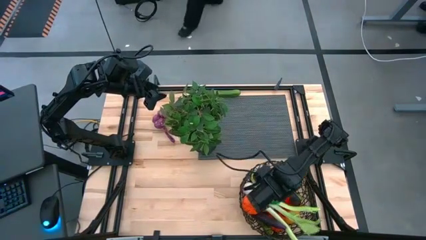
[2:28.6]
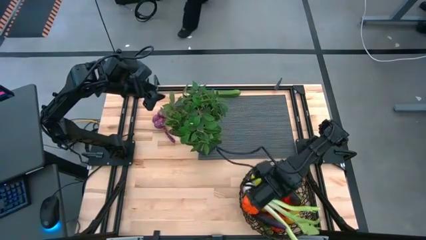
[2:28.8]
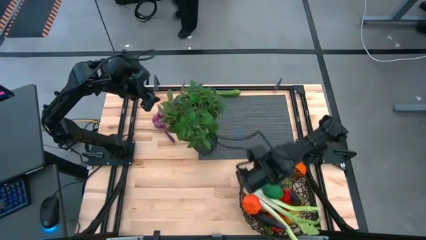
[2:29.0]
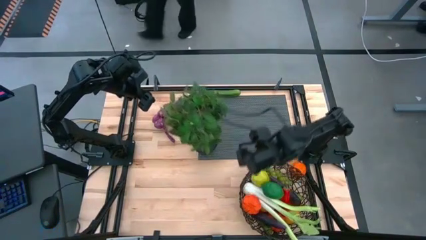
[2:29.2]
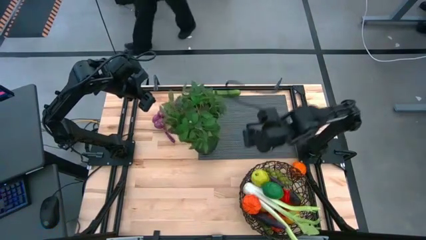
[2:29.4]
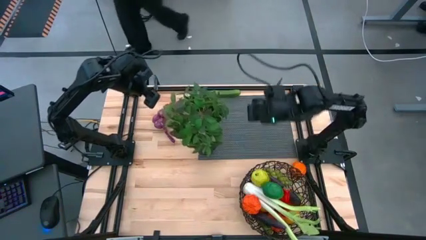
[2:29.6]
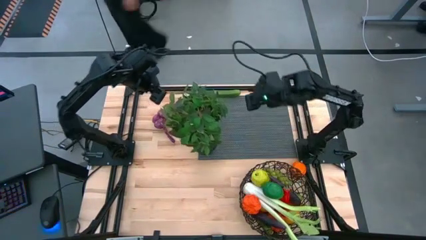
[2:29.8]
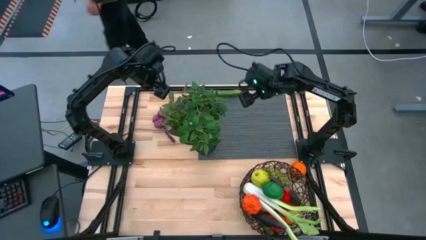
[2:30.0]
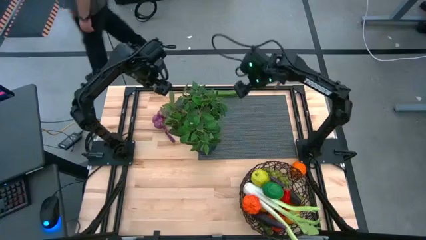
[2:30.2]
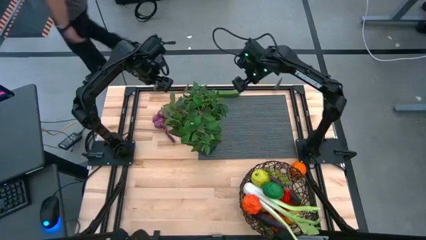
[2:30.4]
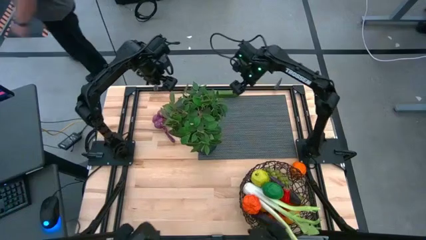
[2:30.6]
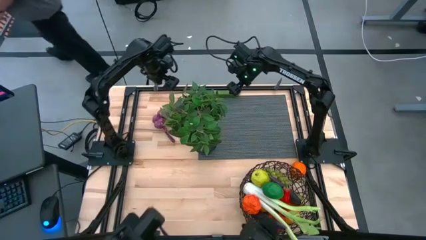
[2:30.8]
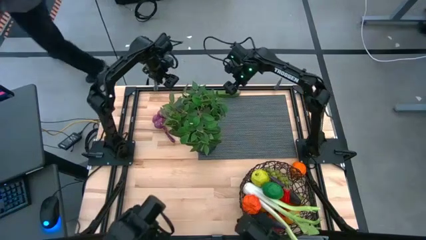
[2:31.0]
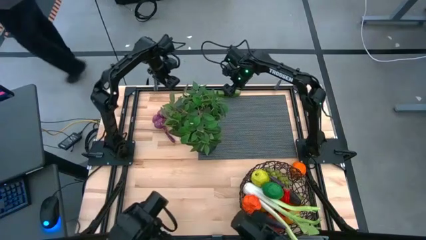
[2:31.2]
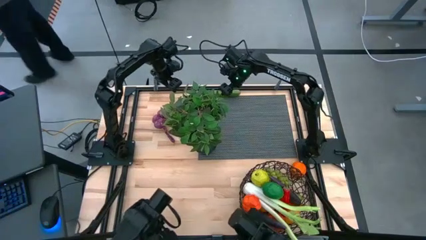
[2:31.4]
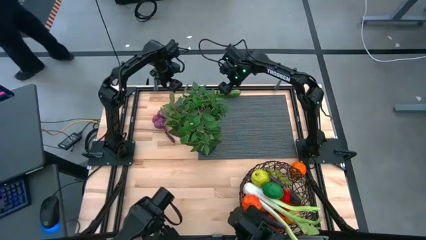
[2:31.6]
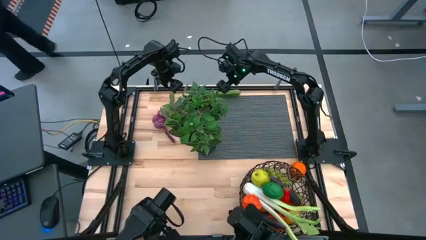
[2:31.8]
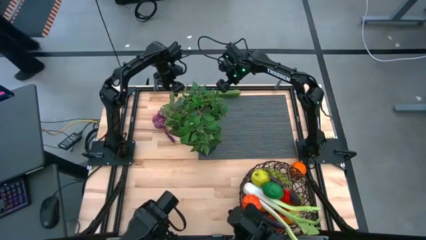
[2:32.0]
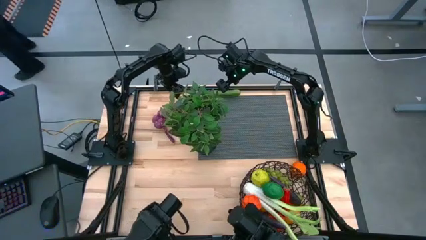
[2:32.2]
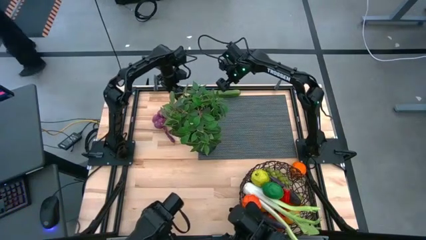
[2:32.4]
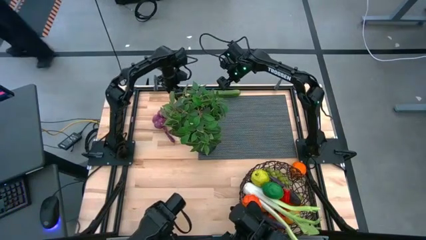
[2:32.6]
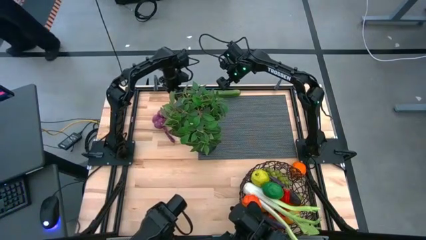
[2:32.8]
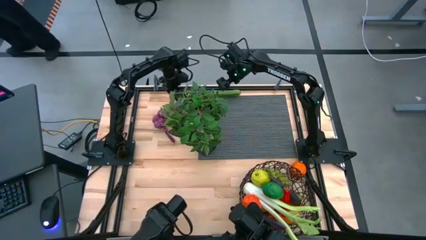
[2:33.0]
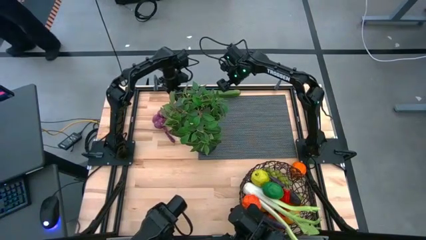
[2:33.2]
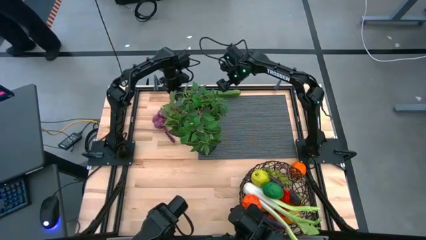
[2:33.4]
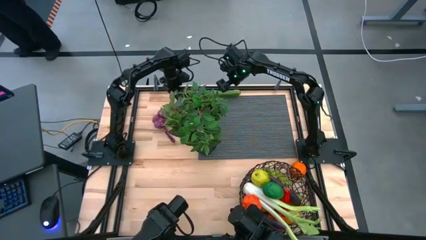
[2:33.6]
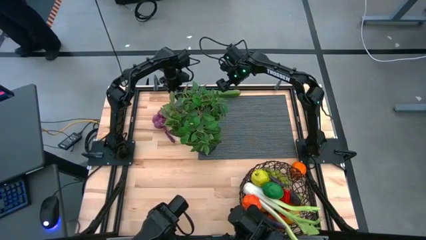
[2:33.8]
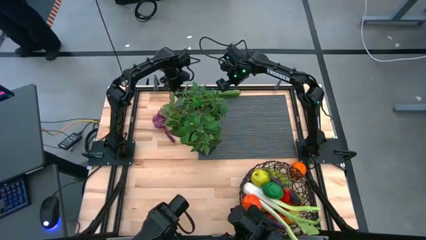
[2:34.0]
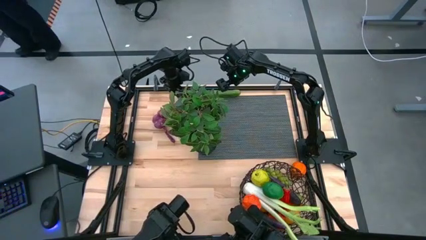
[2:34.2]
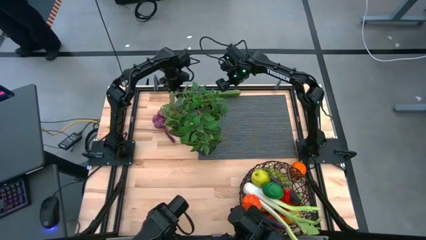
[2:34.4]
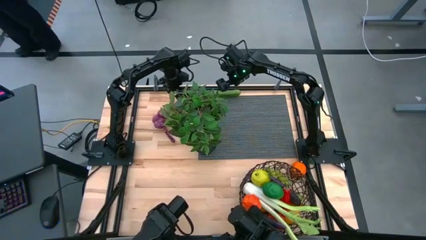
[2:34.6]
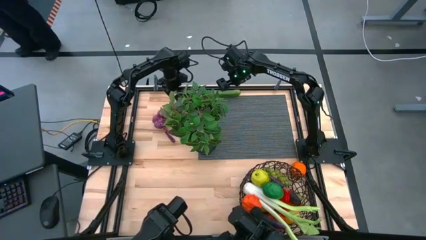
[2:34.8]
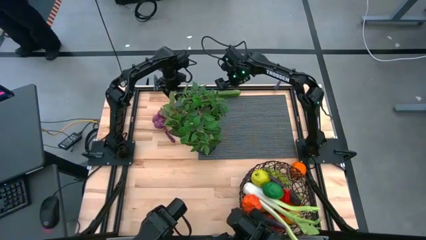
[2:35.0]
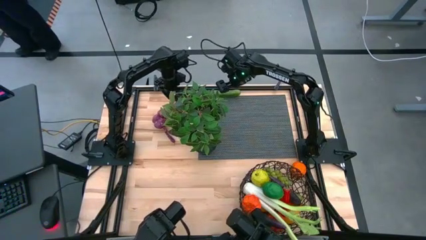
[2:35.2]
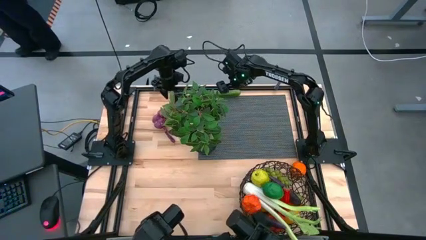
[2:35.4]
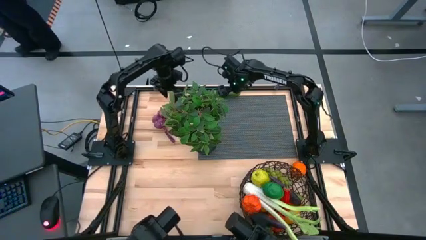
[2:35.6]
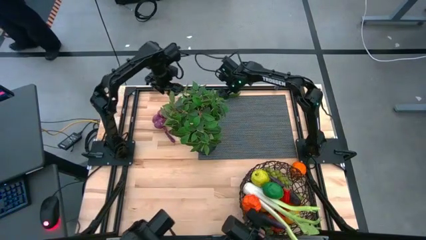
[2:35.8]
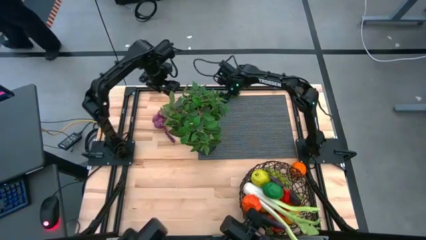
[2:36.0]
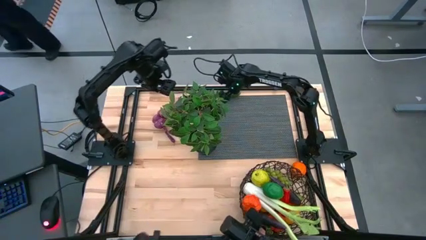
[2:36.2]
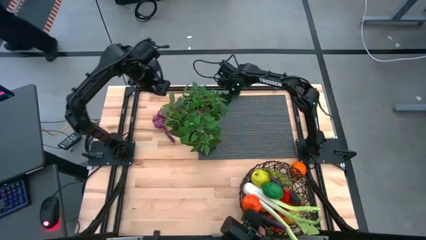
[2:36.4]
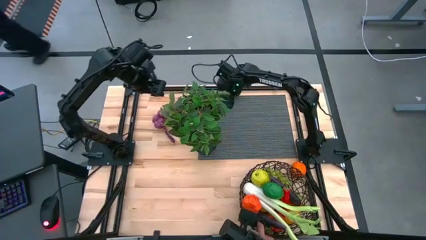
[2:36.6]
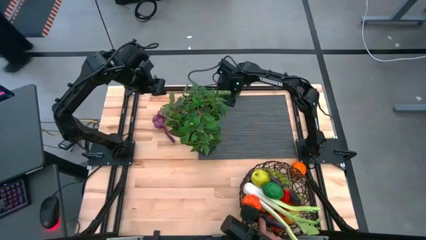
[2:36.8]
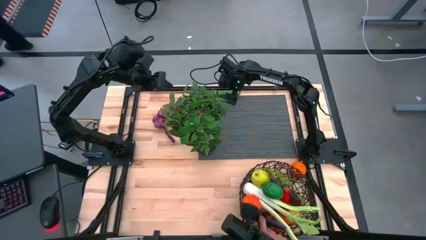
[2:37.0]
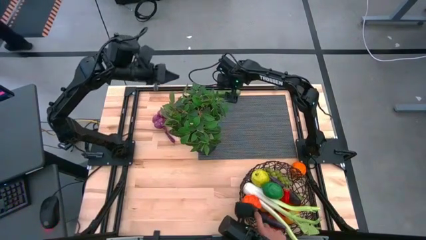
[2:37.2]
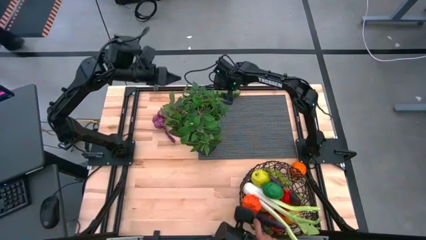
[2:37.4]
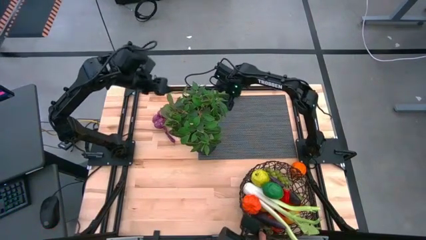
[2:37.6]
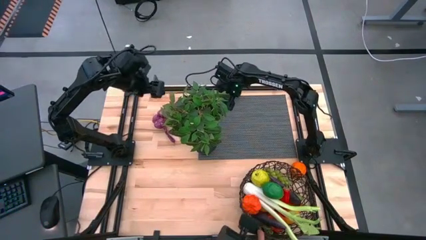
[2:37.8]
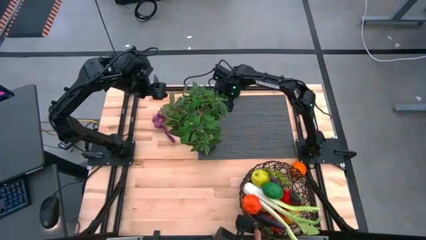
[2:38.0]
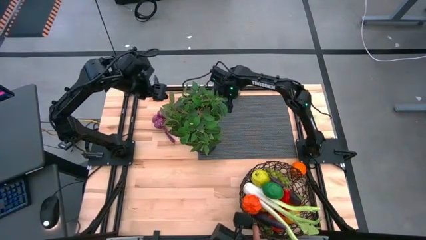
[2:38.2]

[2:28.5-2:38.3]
Task: Build produce basket
Put the green cucumber into the brown wire basket

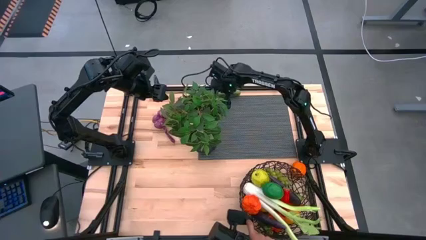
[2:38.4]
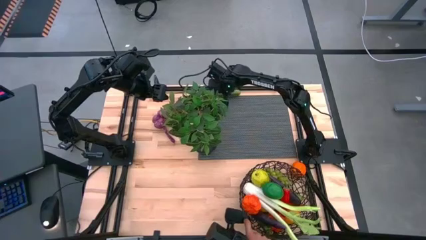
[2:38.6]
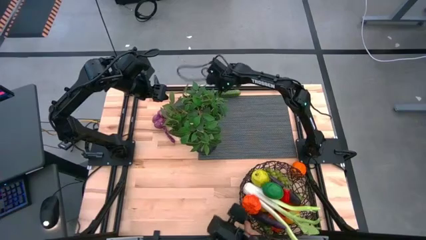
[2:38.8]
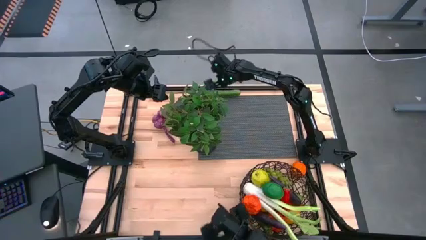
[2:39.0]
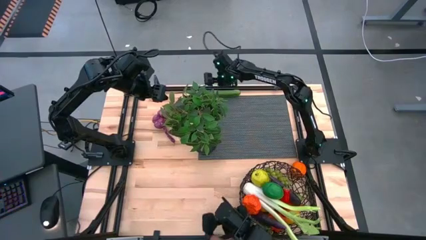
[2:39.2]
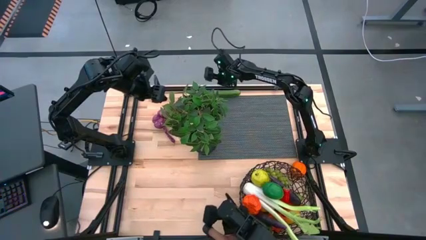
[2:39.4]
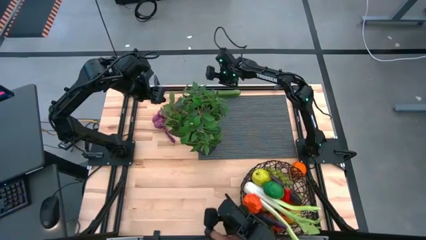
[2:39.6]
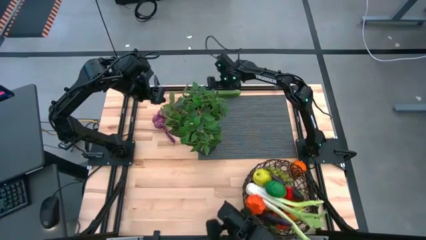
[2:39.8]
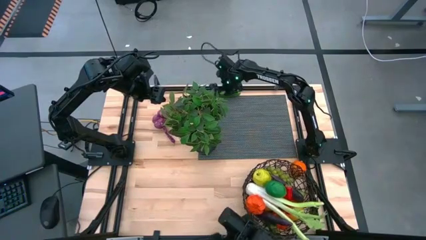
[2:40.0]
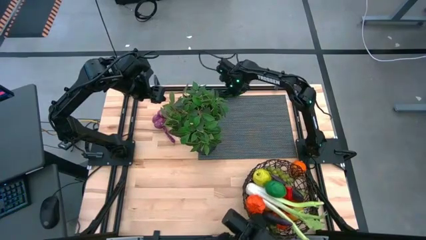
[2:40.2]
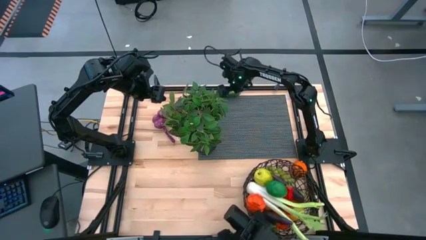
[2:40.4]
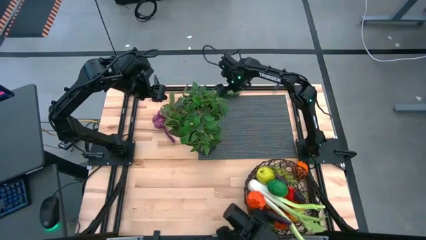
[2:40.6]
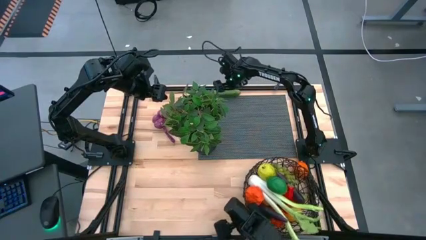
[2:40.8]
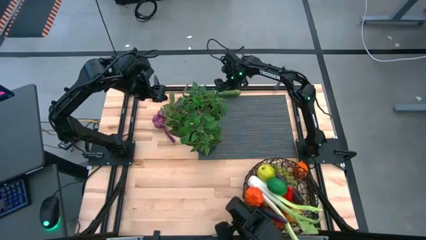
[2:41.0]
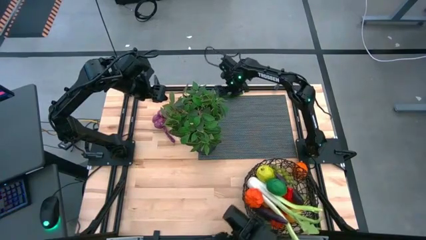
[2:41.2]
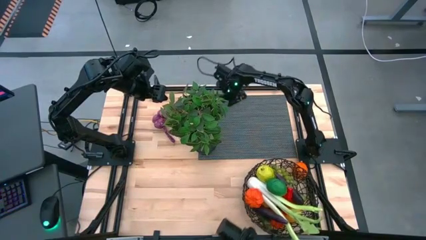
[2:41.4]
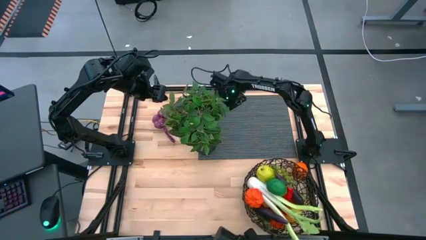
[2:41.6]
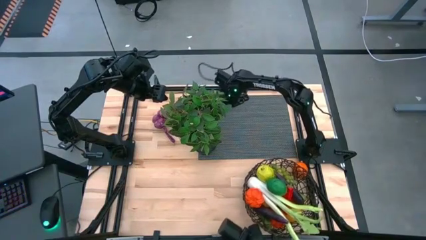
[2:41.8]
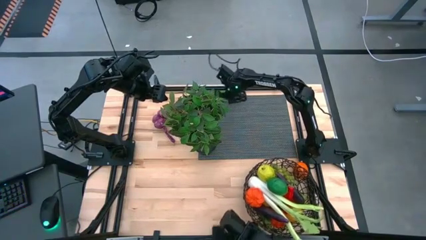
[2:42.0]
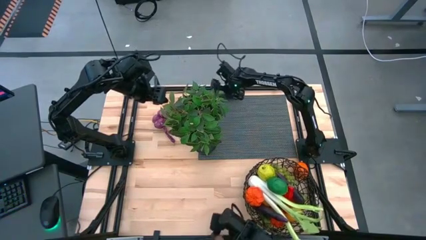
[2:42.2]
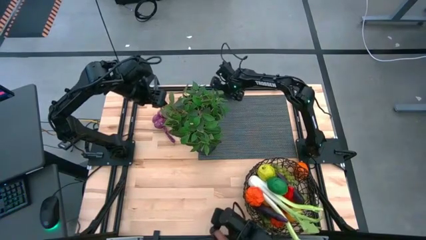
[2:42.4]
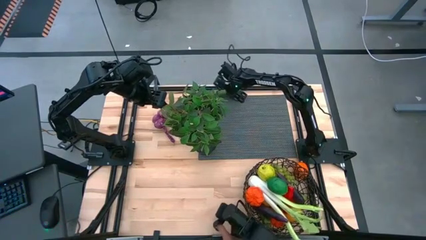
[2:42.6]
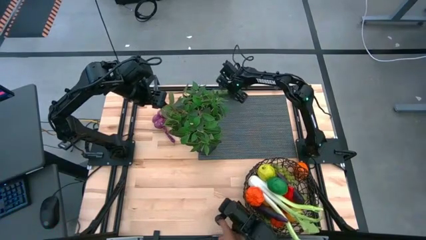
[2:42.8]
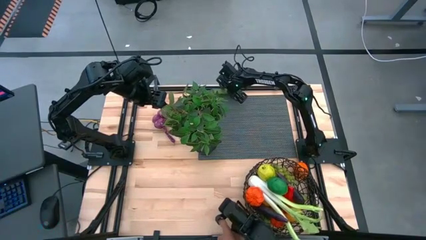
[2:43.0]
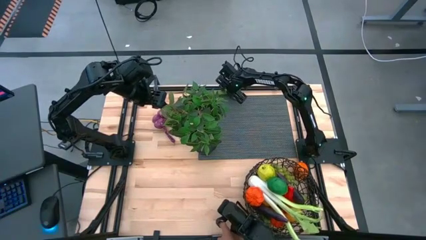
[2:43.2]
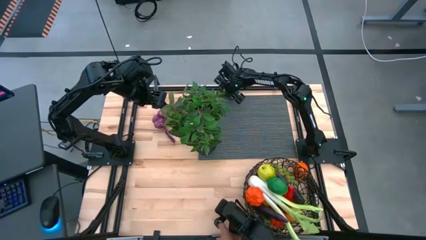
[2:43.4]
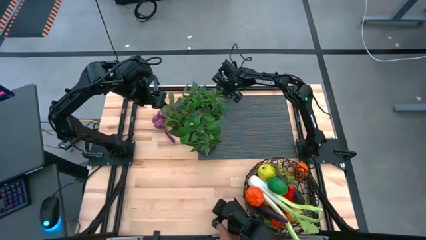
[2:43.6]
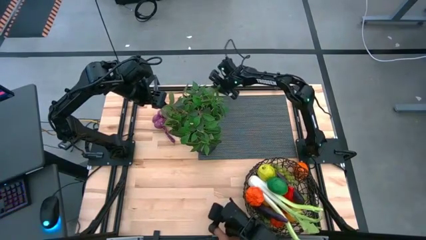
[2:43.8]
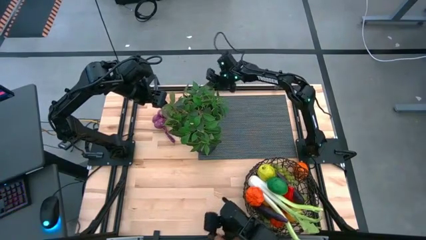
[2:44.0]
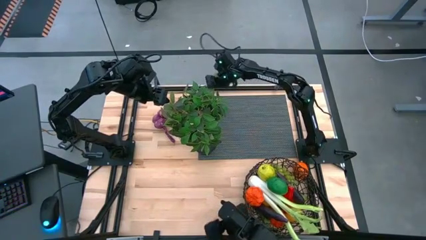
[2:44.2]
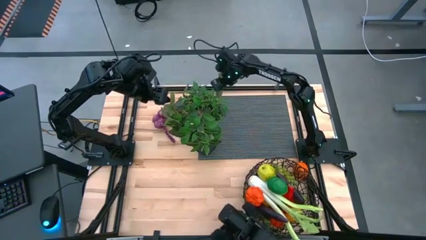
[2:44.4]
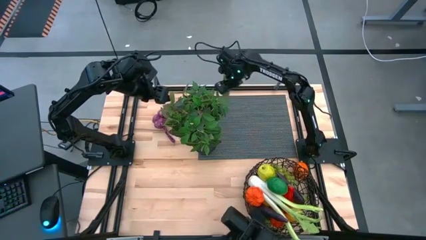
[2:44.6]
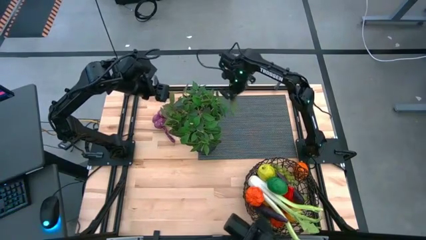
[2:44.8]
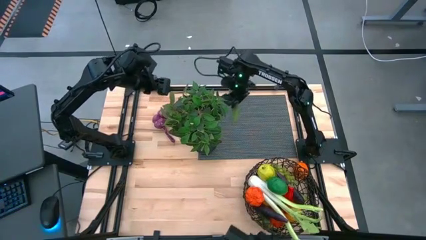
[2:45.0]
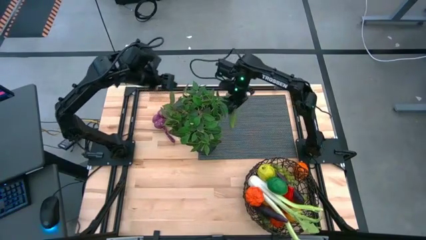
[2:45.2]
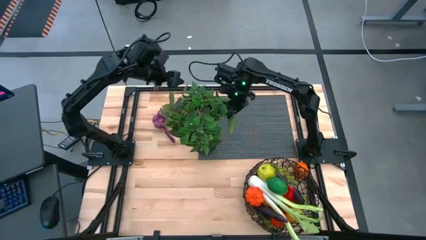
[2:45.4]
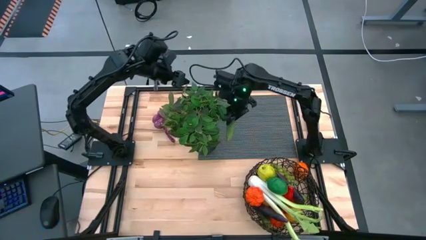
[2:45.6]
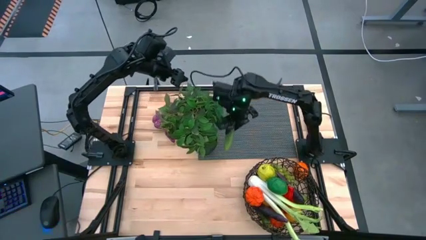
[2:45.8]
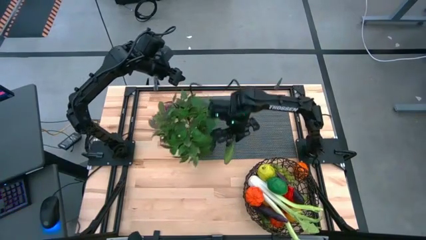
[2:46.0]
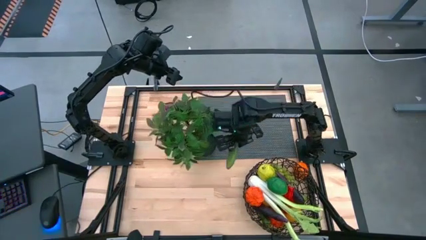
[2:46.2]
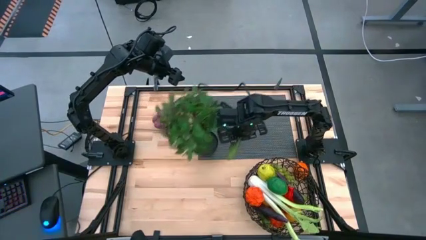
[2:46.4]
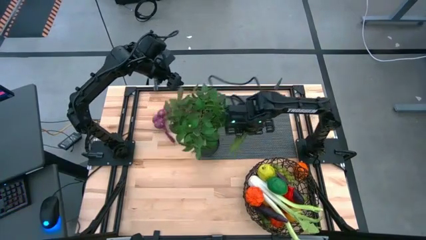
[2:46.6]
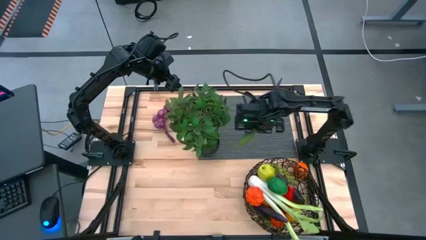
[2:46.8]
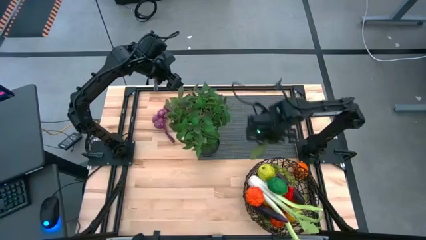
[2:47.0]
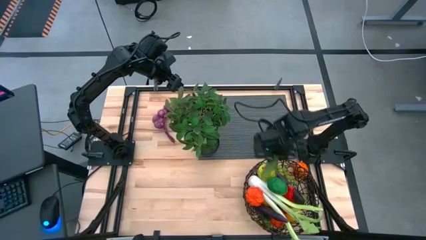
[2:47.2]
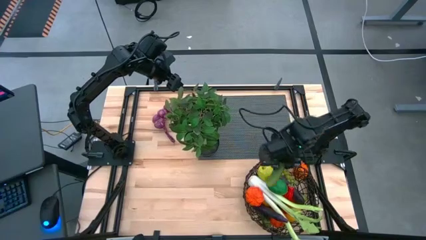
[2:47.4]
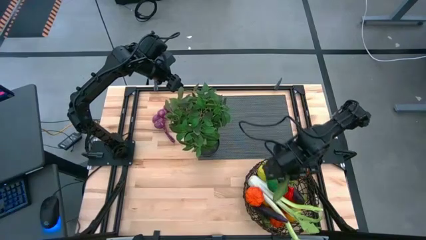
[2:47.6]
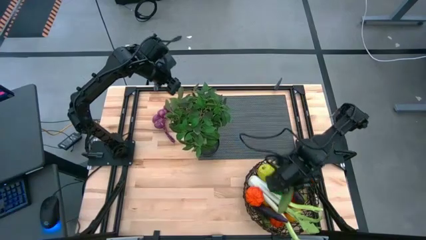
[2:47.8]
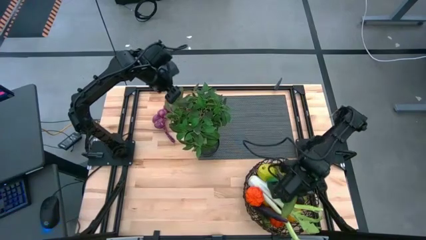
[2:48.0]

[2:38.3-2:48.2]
Put the green cucumber into the brown wire basket
